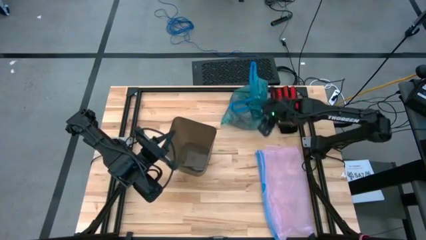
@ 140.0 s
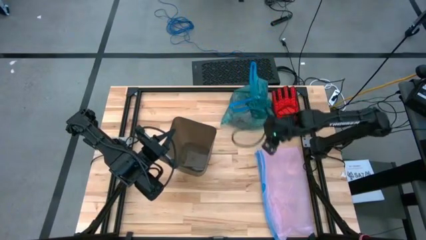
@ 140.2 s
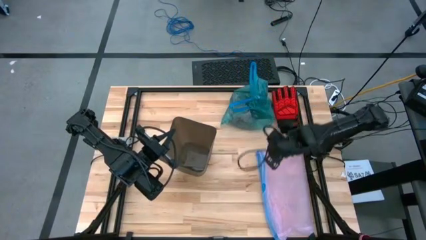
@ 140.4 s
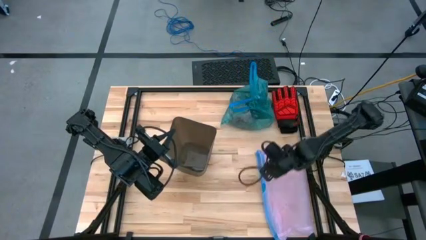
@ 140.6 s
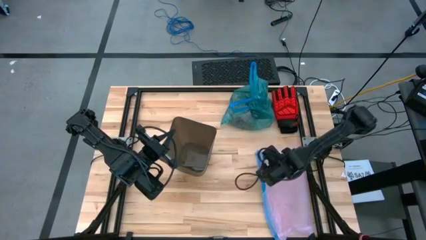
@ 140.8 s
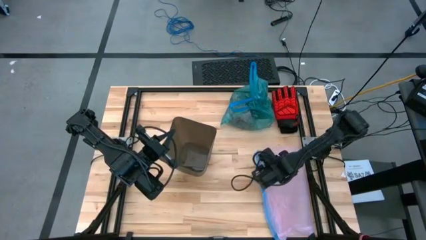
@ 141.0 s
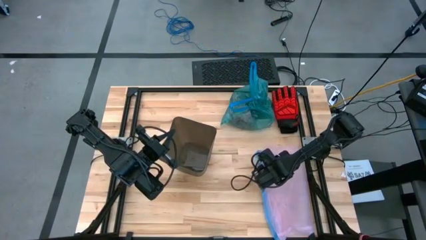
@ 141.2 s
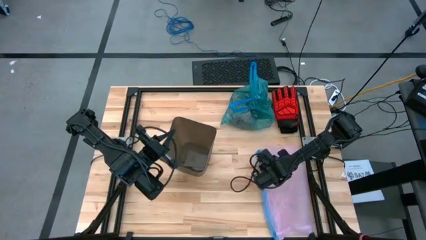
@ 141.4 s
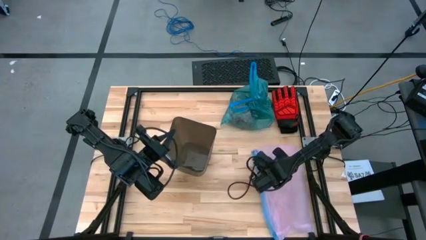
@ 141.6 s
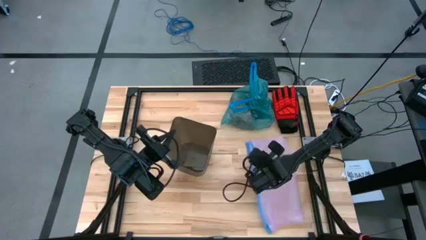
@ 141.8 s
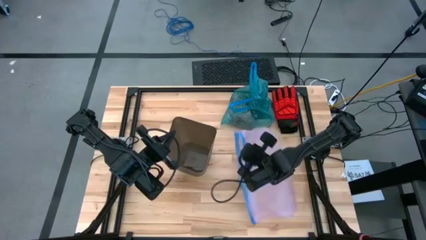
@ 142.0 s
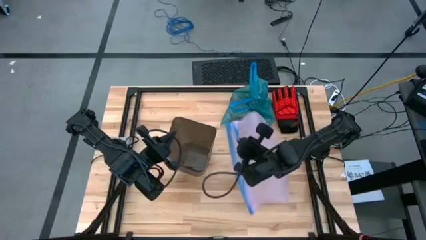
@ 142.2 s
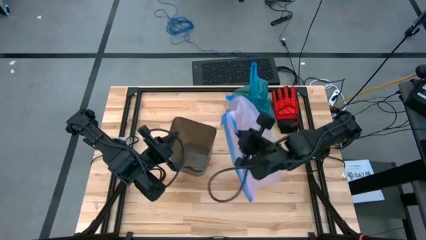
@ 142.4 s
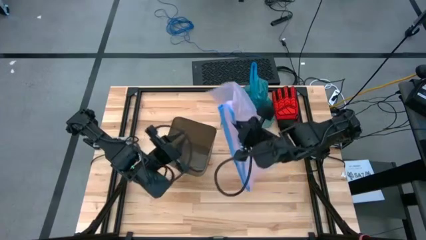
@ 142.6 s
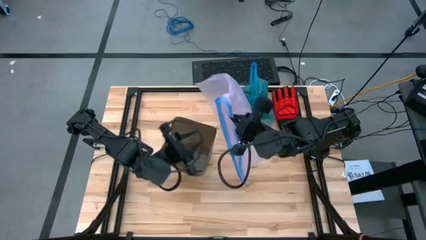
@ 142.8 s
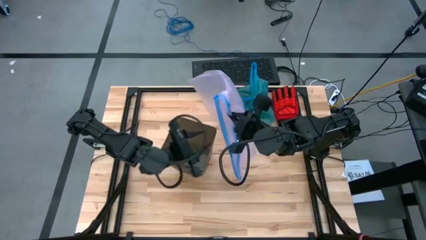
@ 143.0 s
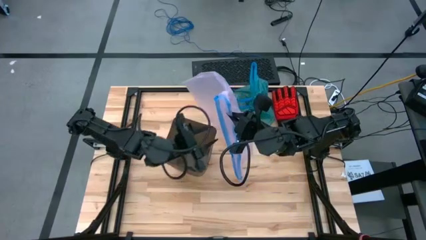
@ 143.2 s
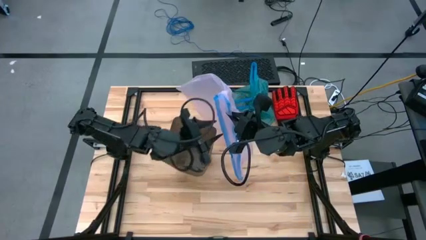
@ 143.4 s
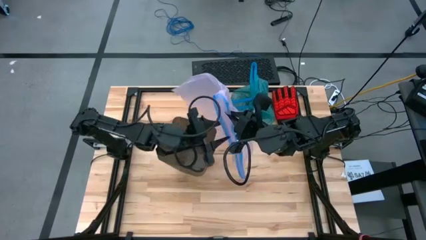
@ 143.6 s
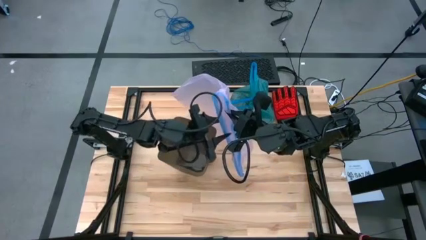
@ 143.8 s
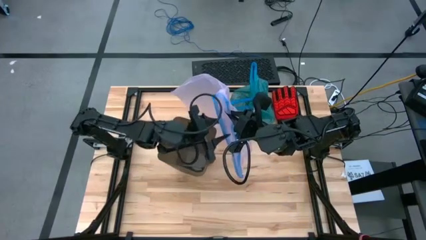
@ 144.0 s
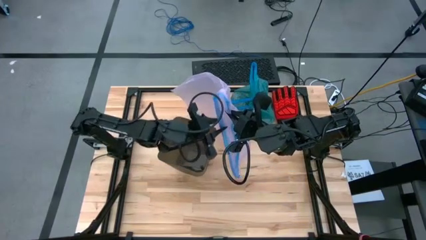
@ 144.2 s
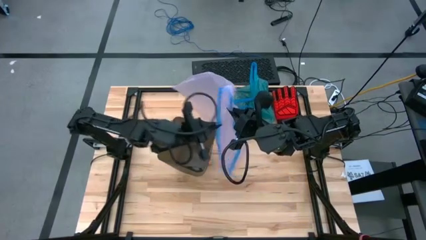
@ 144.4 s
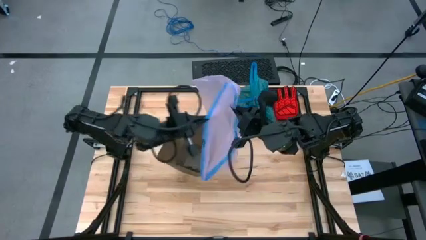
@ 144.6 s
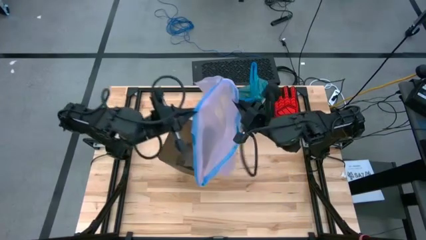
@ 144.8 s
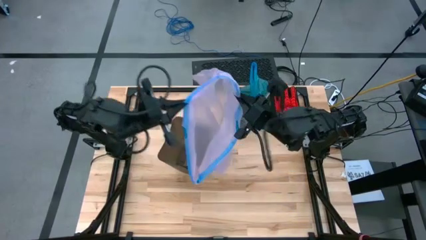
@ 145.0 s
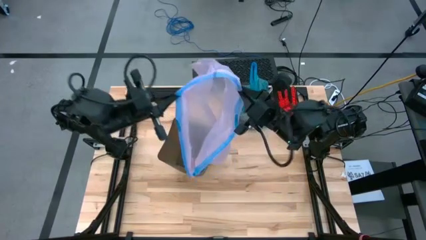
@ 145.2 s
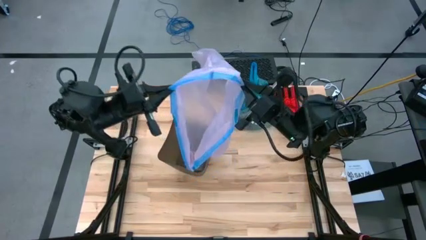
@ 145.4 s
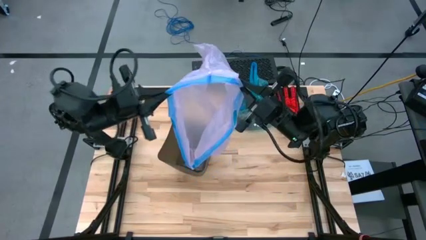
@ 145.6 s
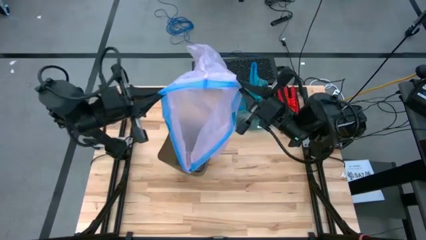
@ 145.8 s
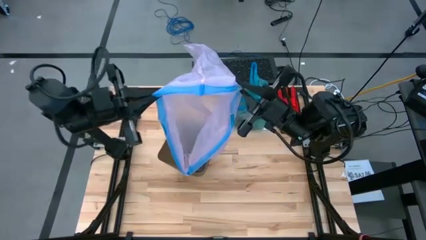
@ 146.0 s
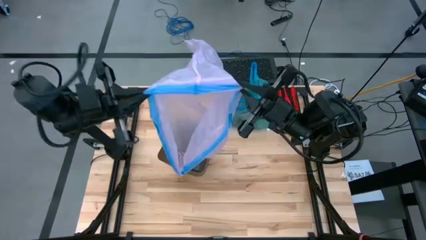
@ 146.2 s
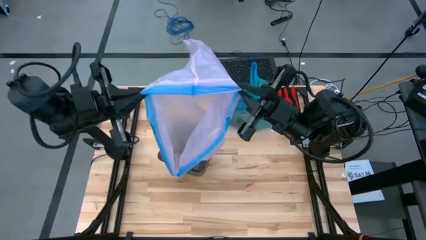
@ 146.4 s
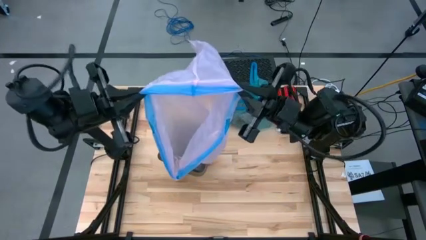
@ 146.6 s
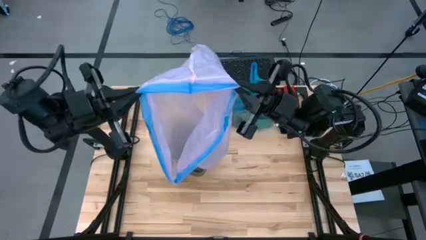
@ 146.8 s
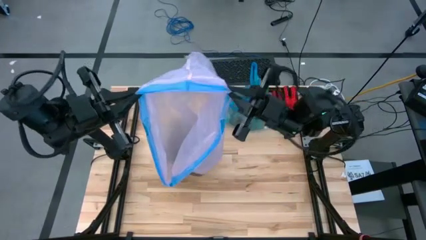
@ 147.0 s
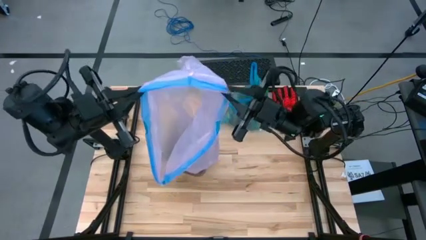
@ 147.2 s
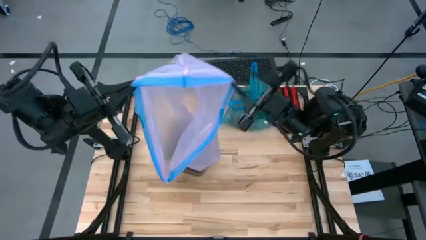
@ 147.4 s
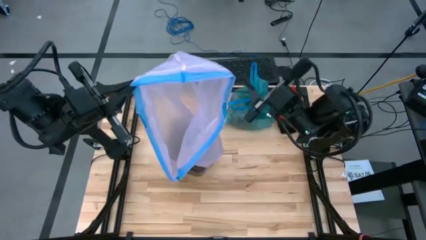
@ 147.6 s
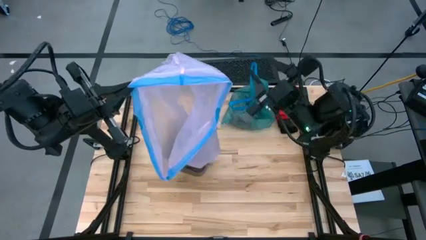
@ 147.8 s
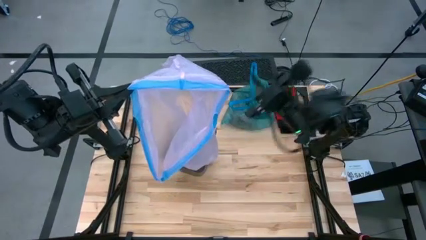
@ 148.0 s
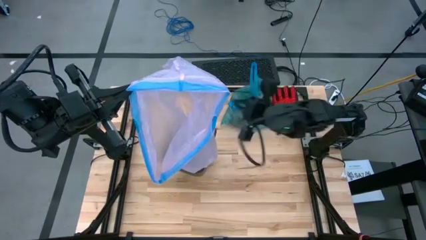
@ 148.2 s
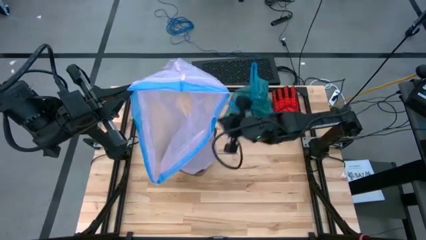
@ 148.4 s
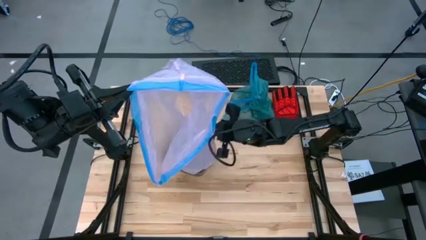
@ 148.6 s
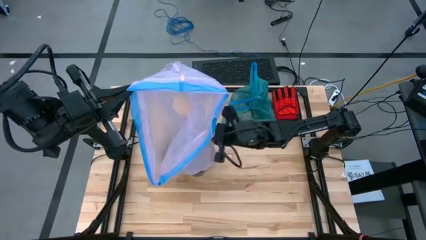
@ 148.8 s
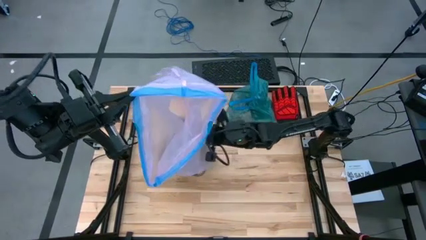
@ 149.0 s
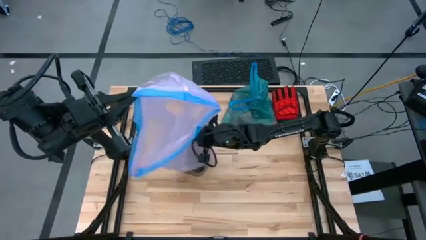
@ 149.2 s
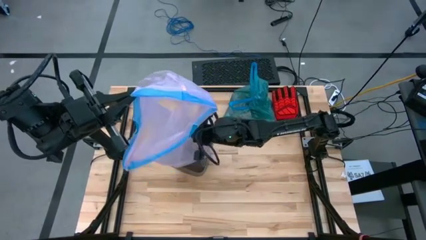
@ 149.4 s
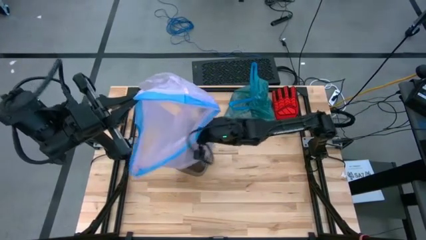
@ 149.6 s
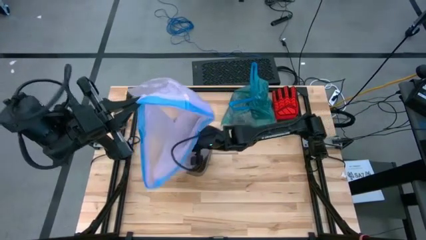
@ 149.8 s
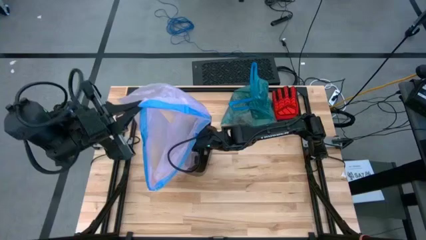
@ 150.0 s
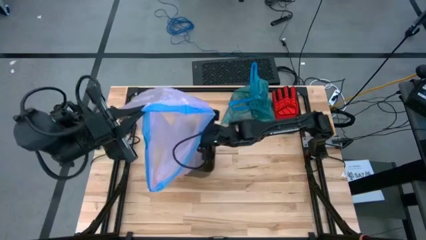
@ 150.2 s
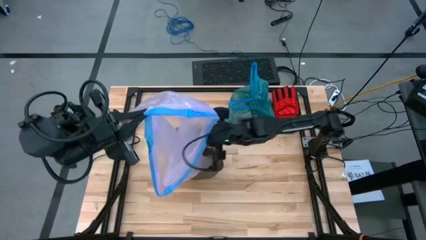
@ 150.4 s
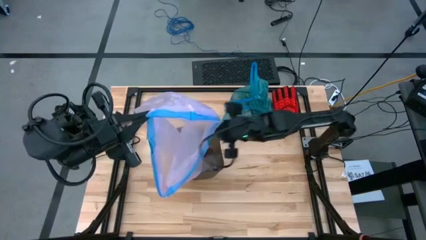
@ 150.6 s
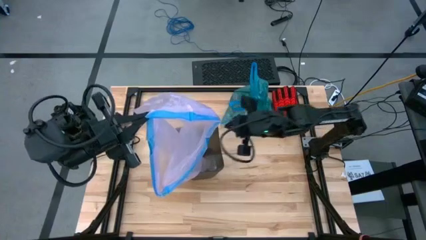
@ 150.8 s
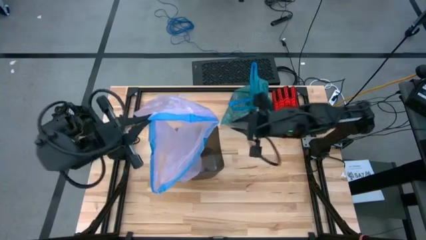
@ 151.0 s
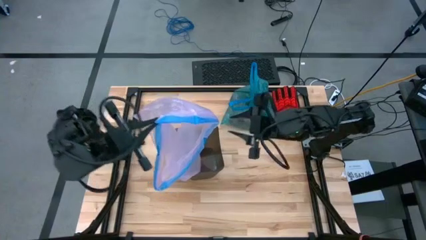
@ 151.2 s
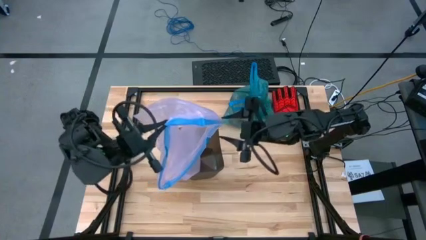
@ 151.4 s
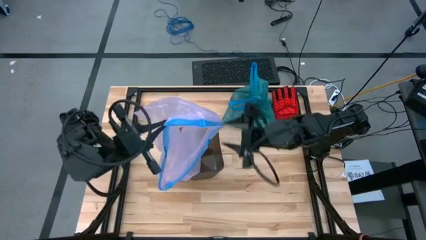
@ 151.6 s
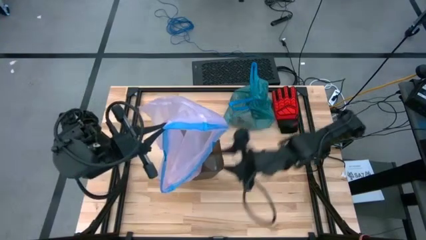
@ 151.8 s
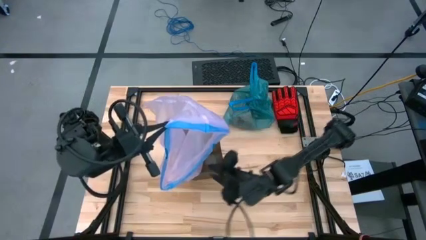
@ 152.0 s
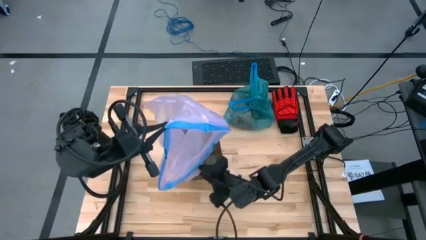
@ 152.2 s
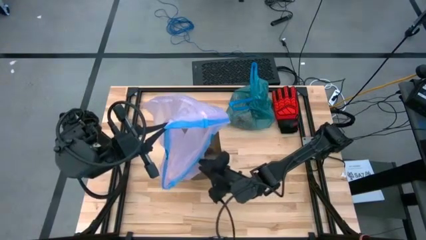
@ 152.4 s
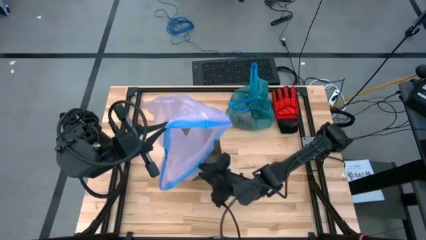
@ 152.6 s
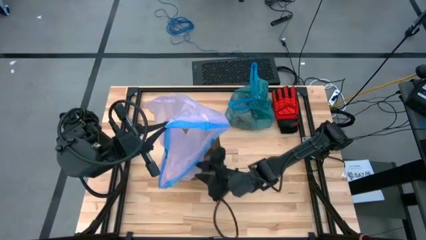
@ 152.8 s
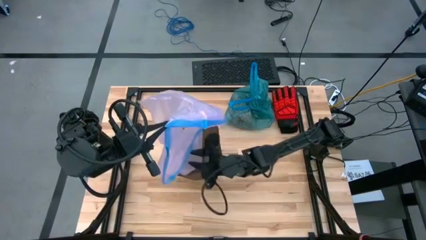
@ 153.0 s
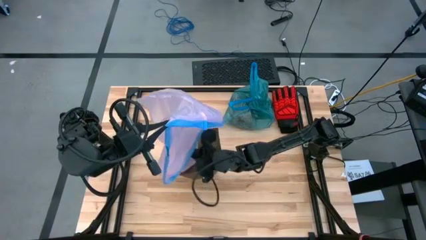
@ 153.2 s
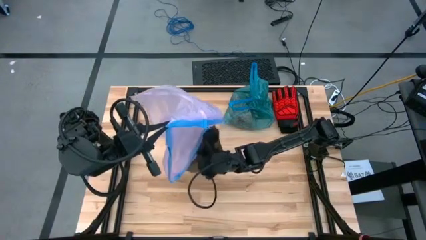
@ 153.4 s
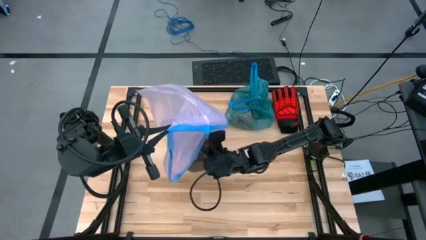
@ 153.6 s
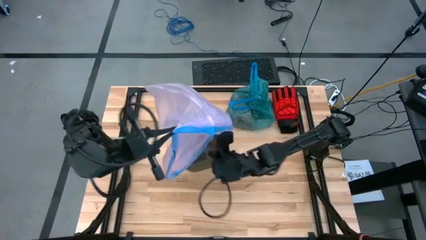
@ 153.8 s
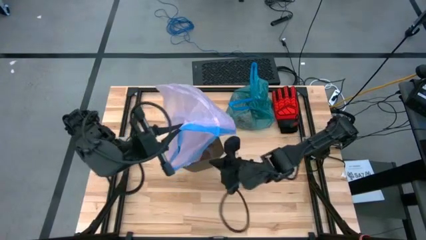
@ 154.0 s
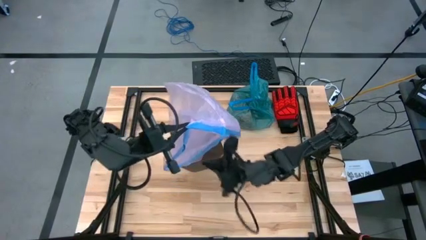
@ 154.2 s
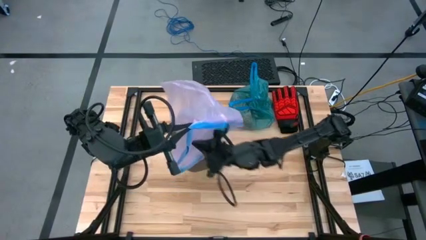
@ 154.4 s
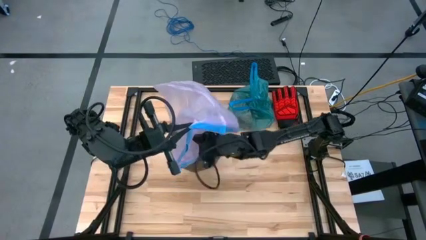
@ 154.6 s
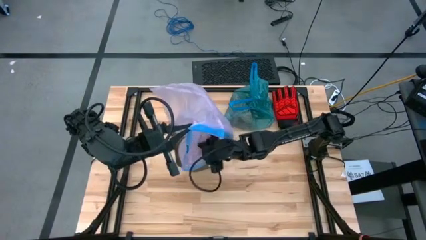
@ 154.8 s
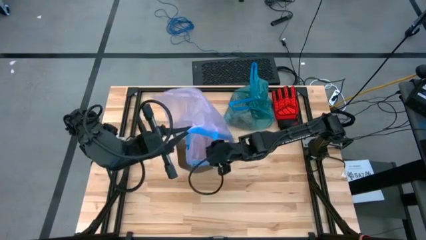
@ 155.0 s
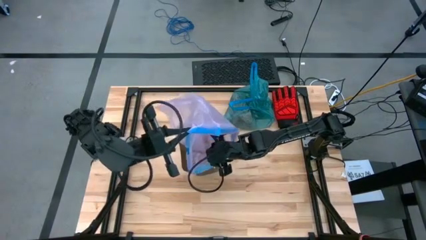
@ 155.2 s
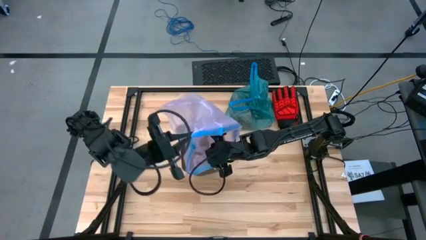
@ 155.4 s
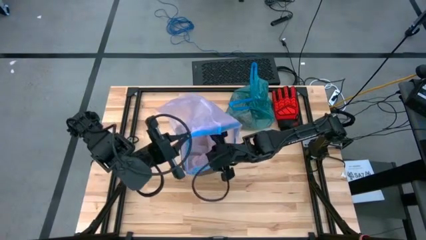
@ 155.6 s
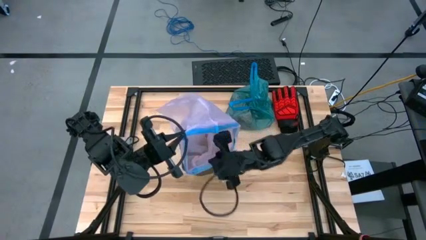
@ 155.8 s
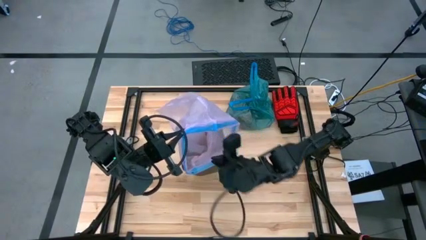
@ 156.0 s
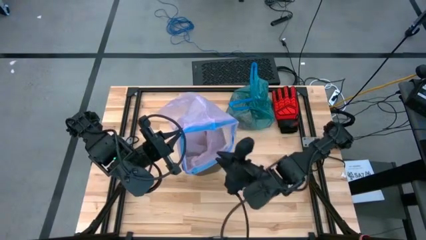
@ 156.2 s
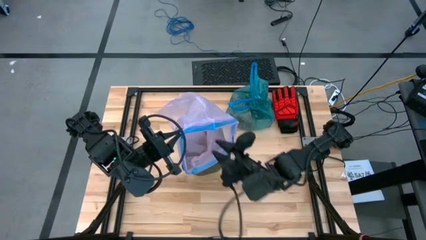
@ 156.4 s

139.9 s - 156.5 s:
Task: place trash/remove bag and relplace
Insert the pink trash bag into the black trash bin
